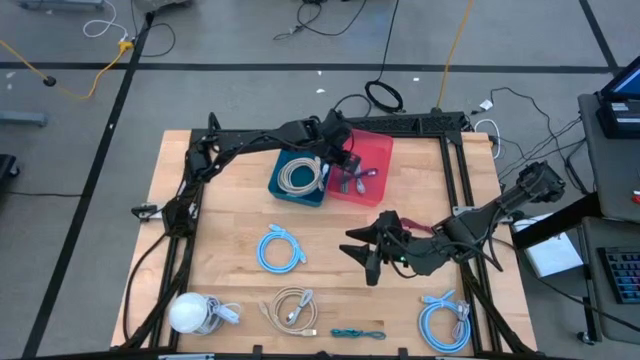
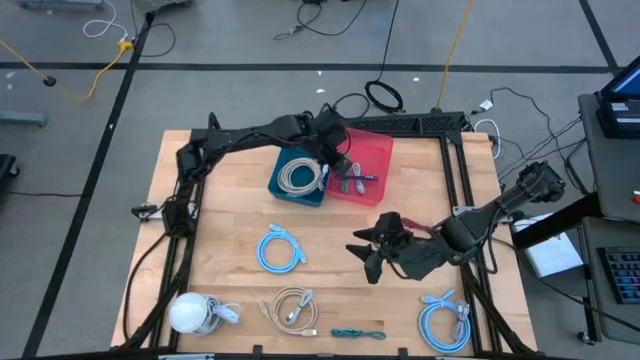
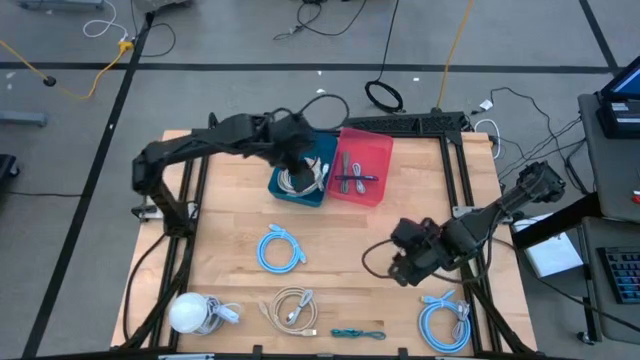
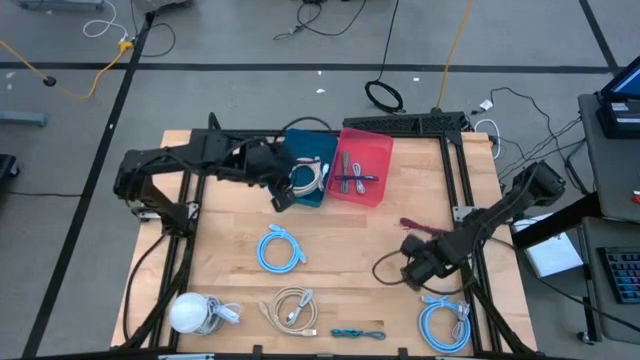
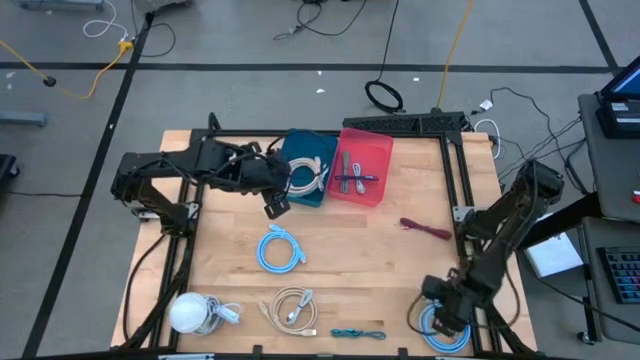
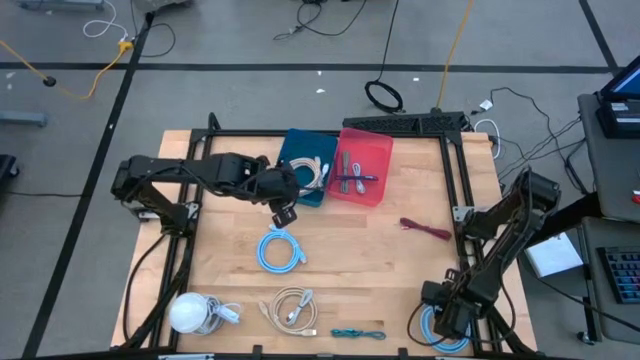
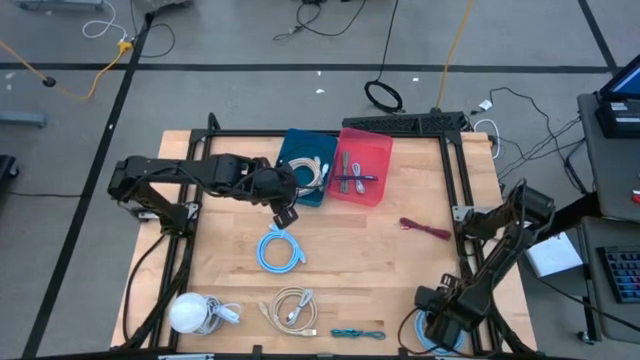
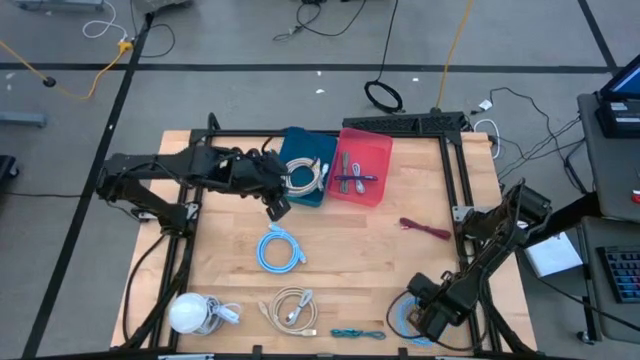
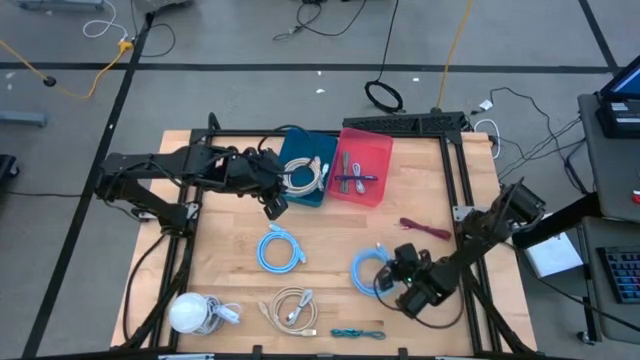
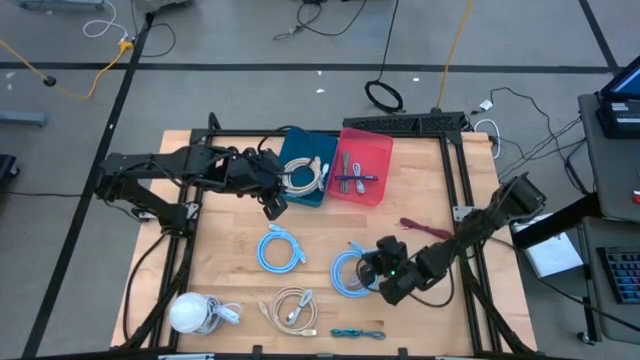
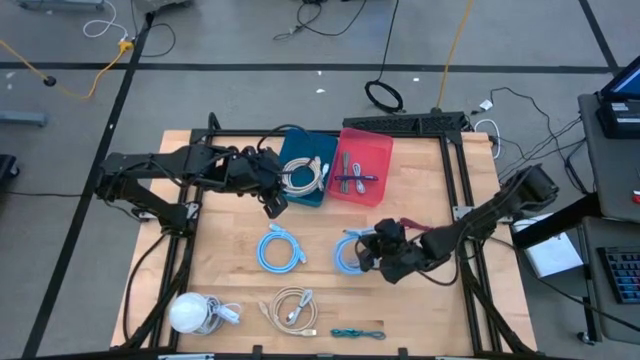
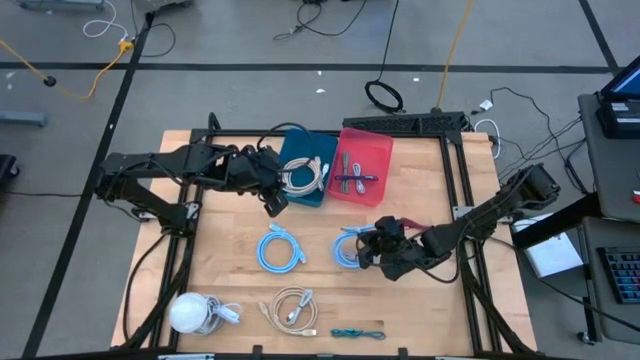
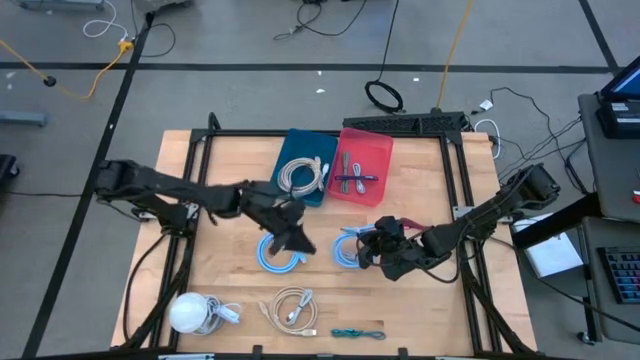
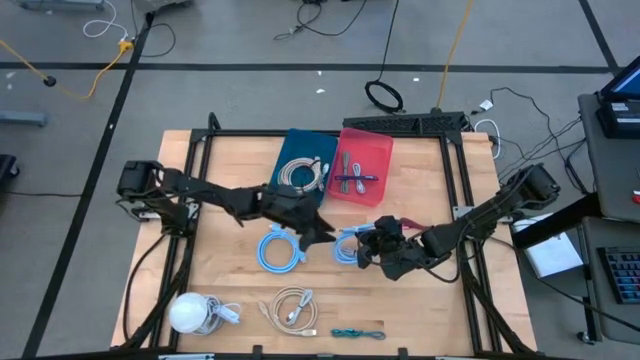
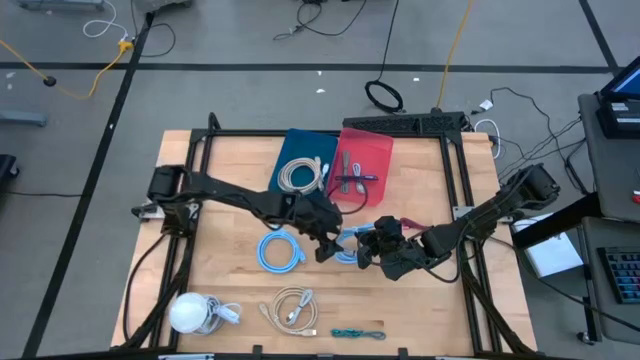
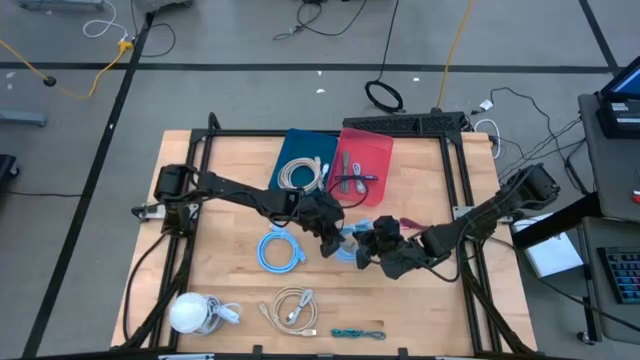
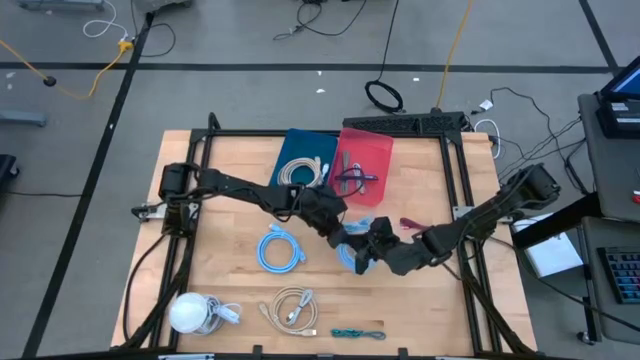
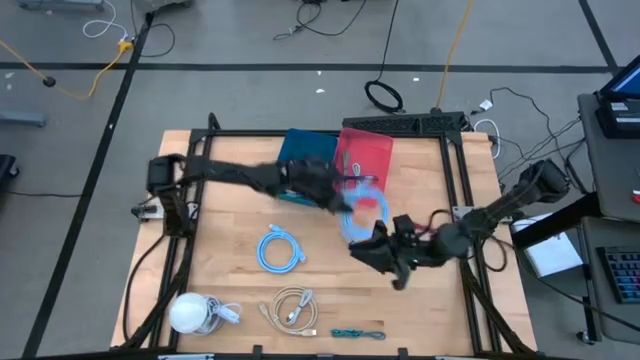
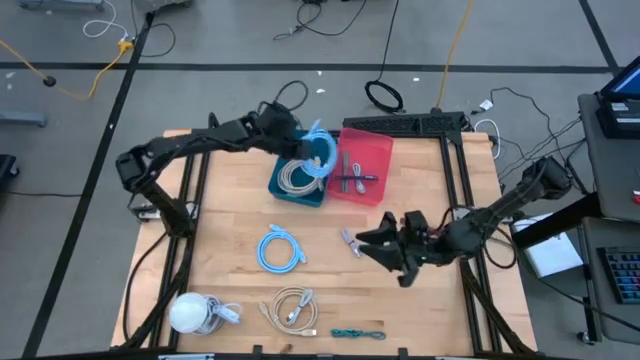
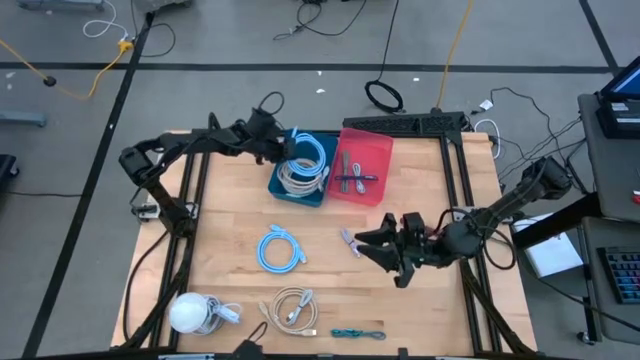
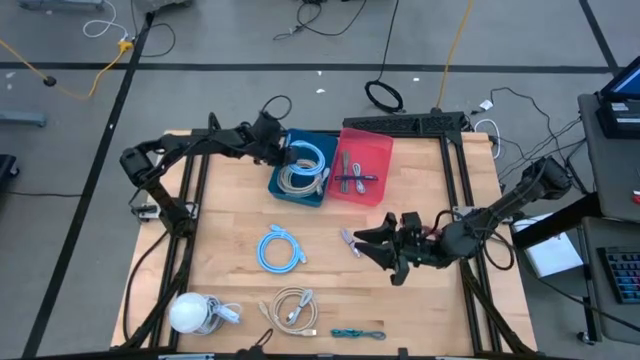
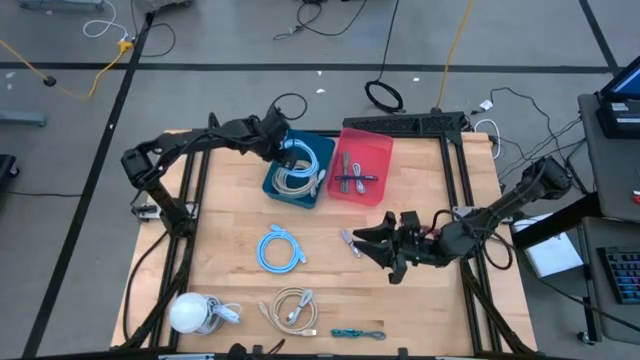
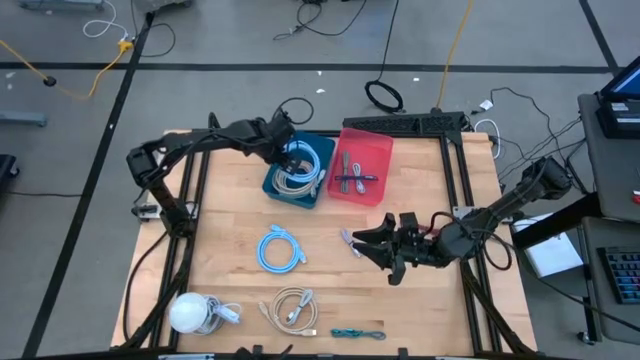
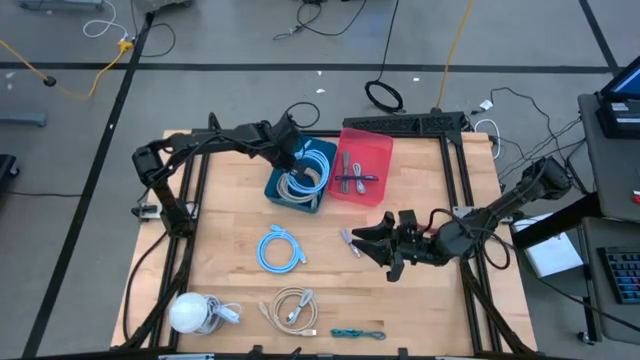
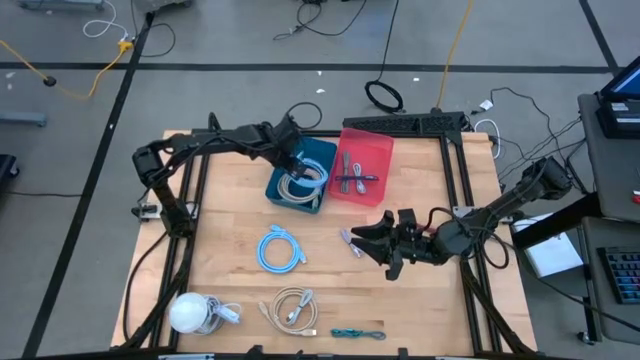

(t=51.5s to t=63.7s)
Task: Pick & Place USB Port
Put the large blue charger cable into the blue bin

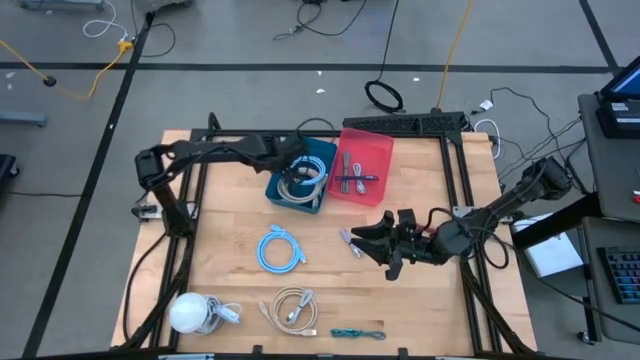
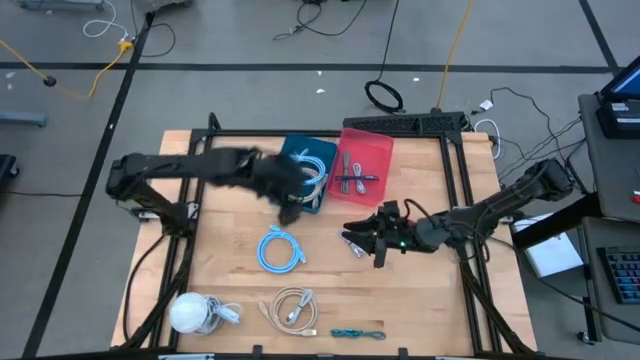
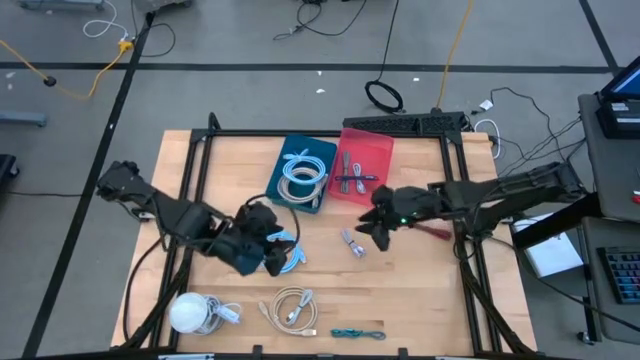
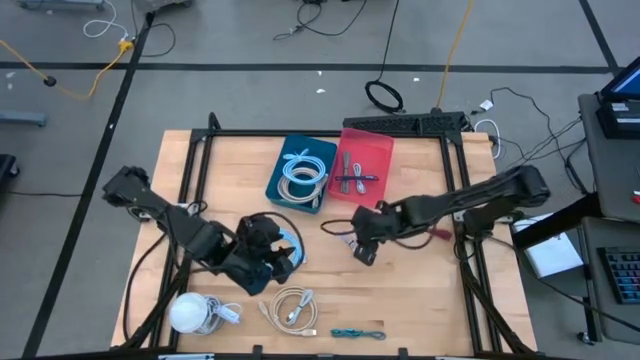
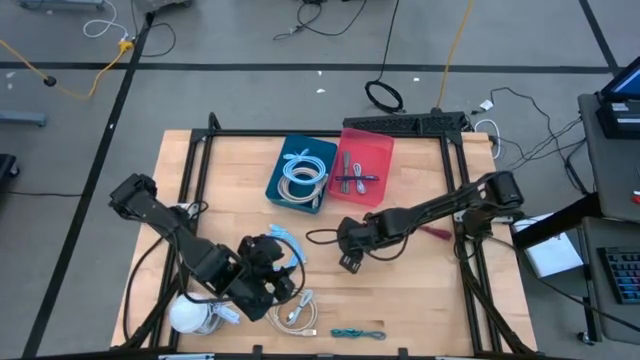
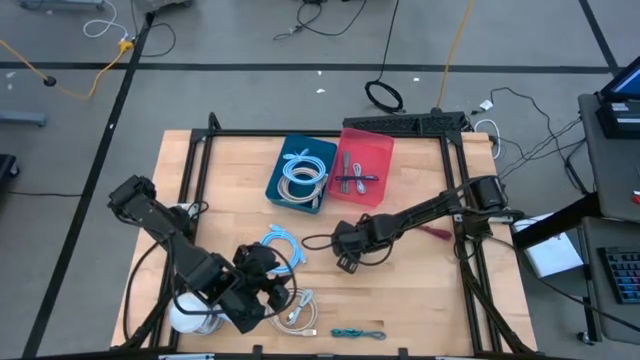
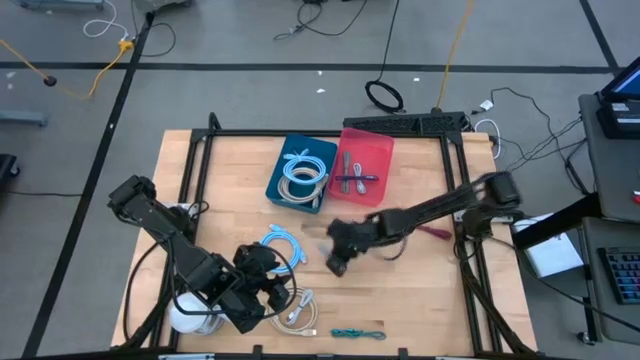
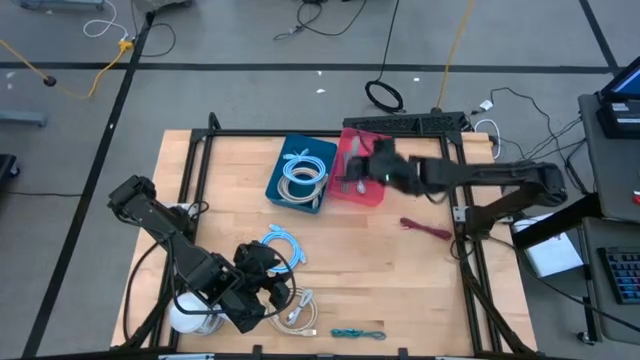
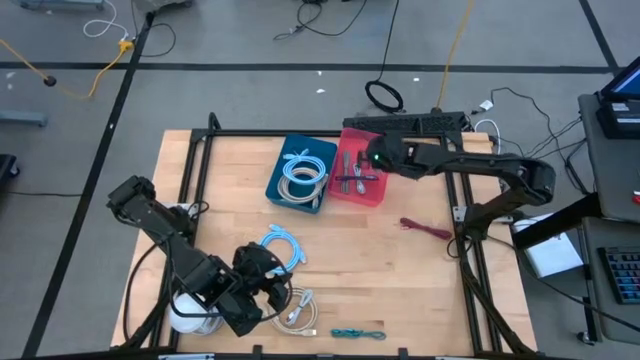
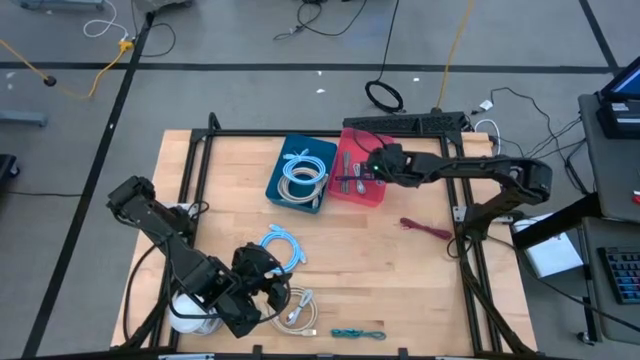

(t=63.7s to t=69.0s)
Put the small purple charger cable into the pink bin

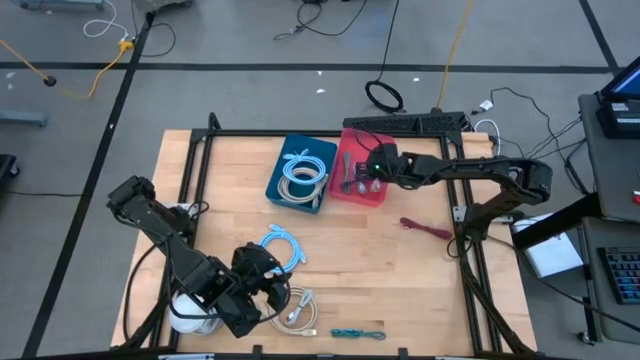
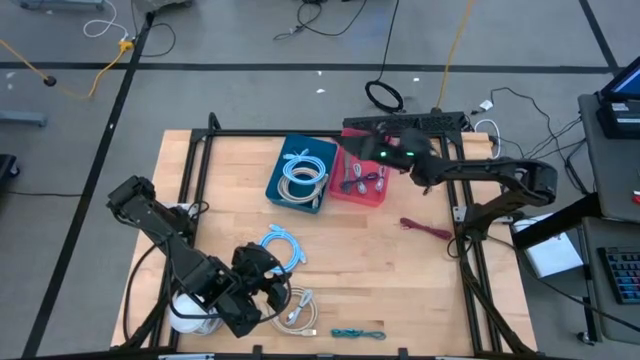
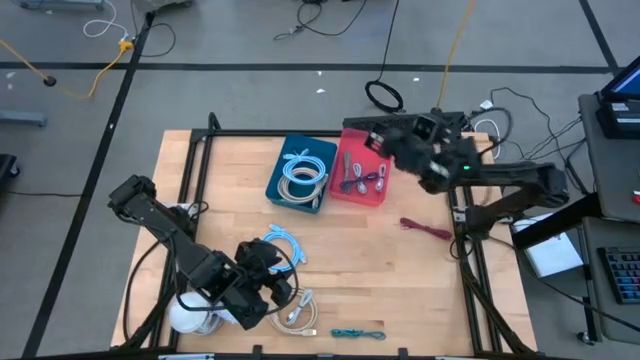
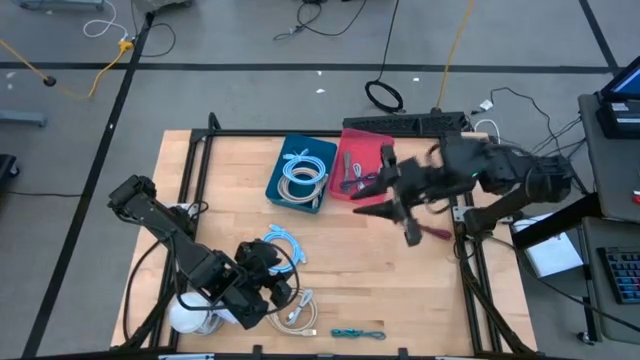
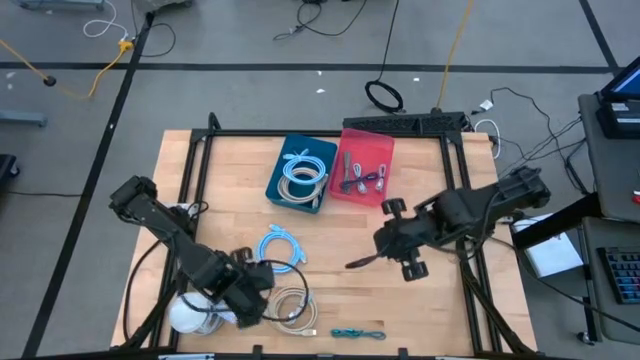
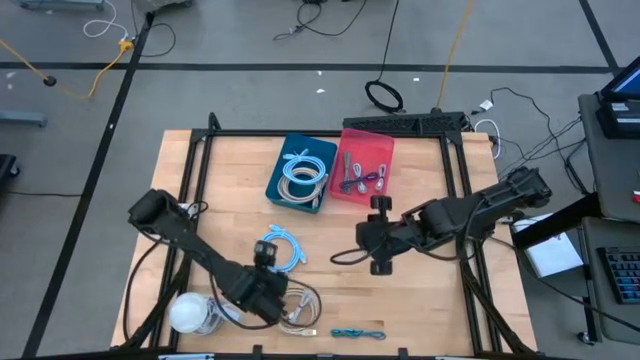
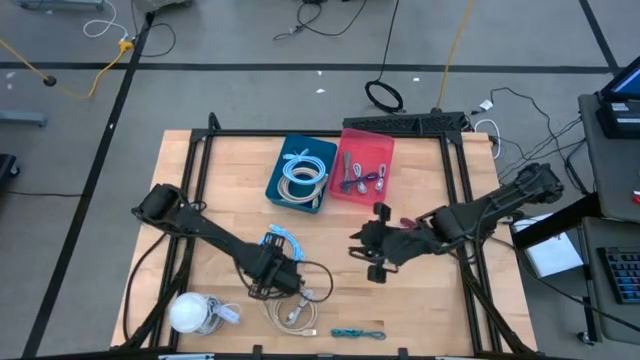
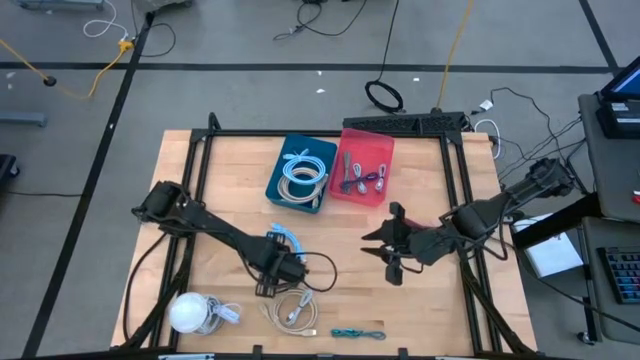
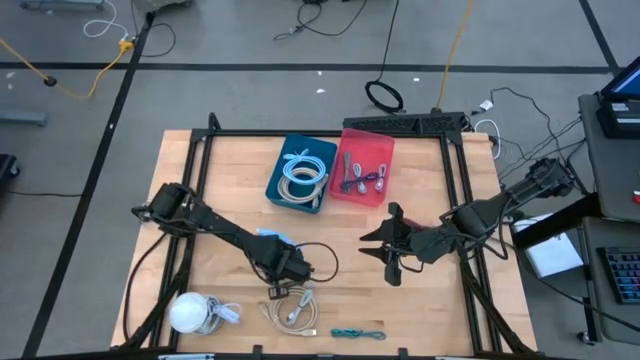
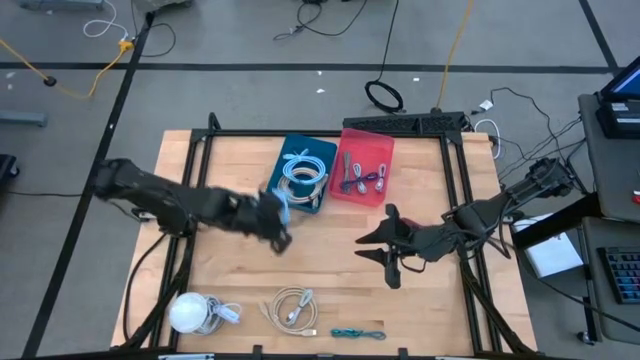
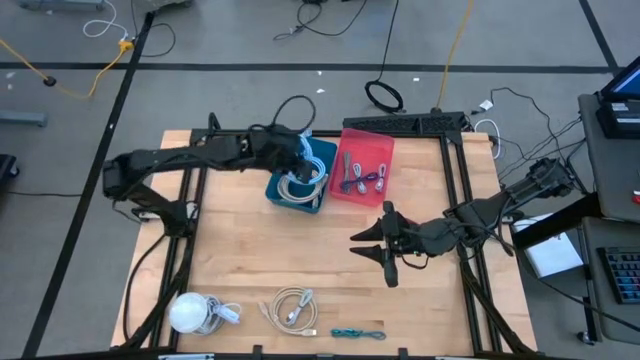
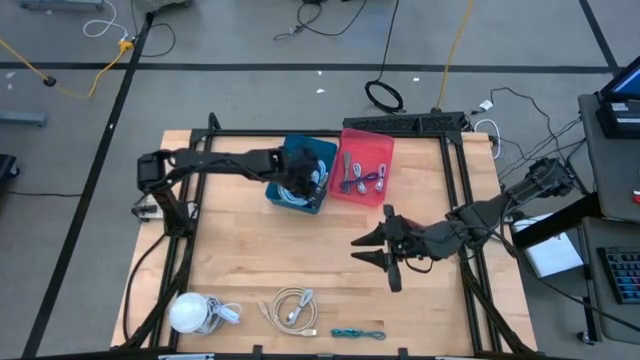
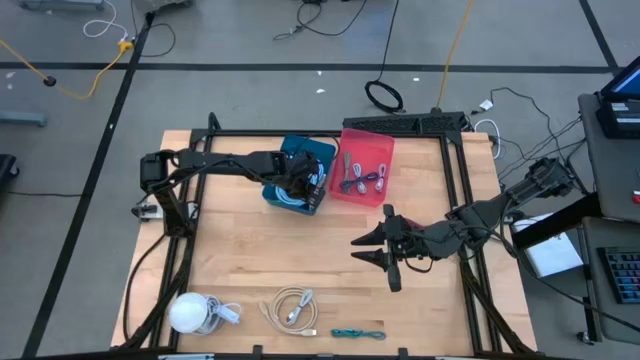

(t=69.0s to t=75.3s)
Put the large blue charger cable into the blue bin
